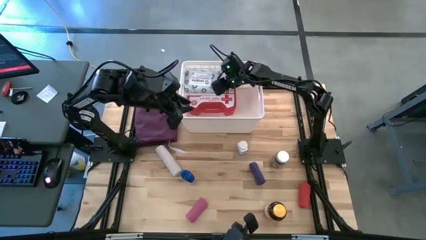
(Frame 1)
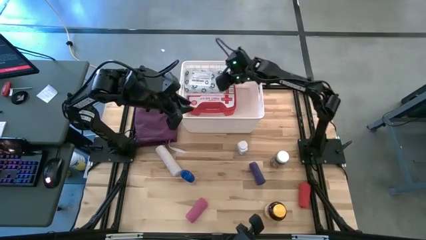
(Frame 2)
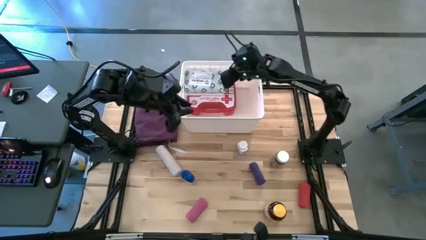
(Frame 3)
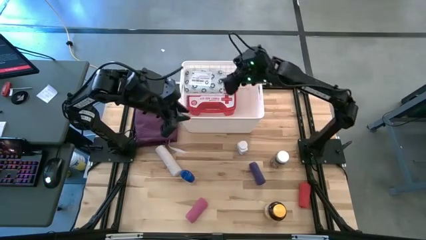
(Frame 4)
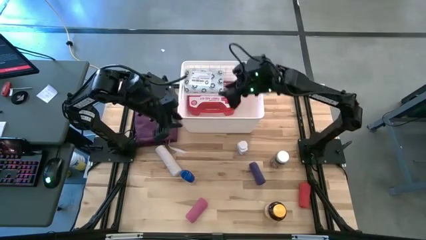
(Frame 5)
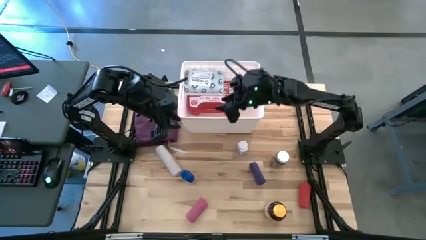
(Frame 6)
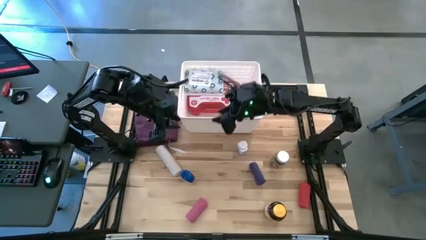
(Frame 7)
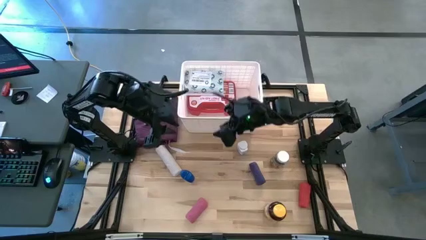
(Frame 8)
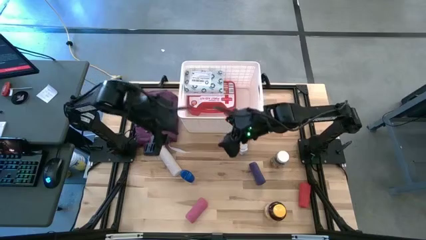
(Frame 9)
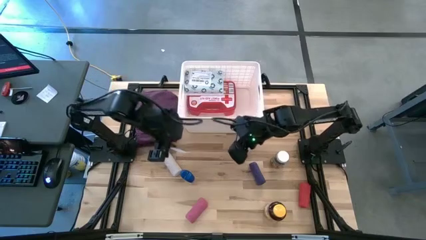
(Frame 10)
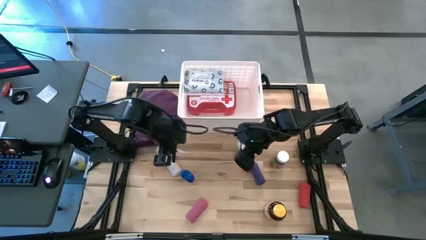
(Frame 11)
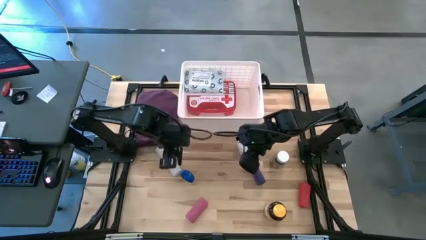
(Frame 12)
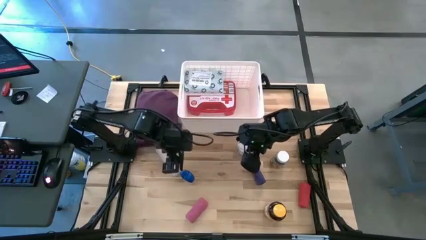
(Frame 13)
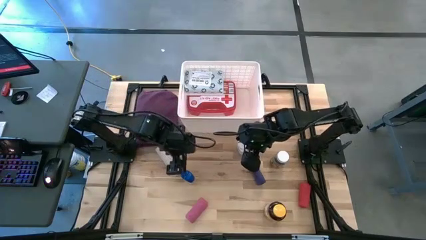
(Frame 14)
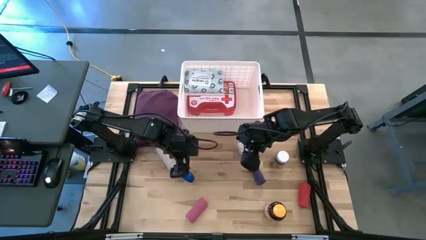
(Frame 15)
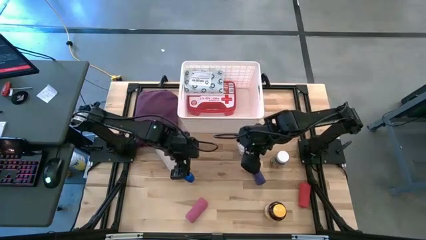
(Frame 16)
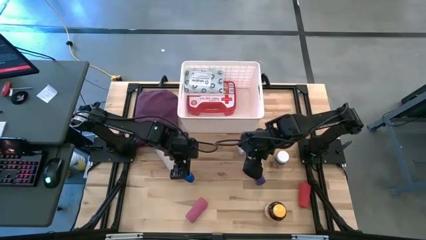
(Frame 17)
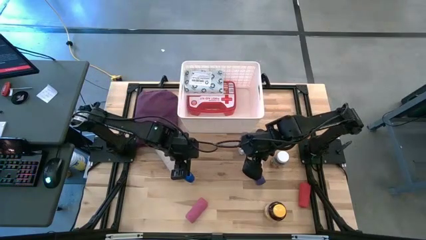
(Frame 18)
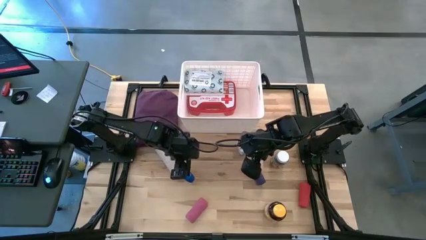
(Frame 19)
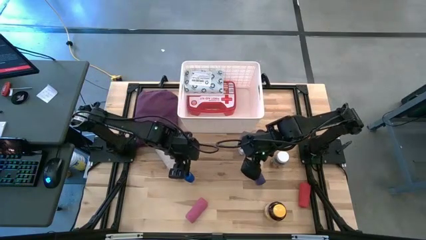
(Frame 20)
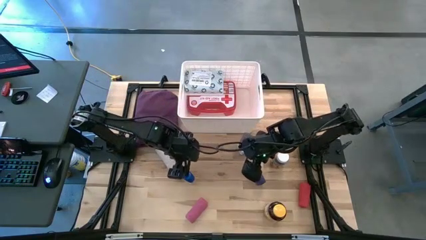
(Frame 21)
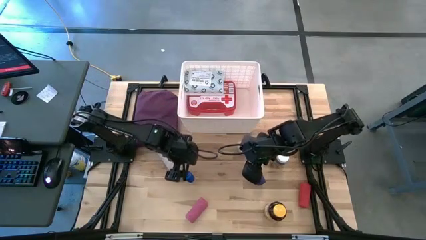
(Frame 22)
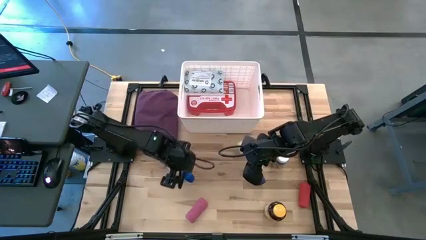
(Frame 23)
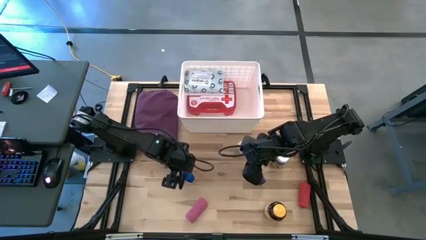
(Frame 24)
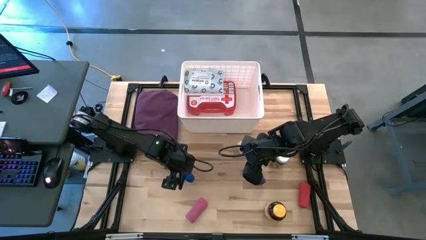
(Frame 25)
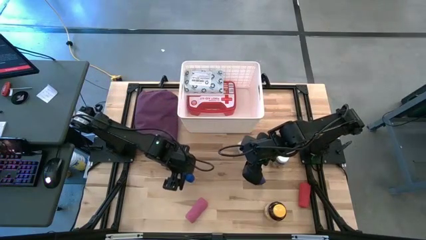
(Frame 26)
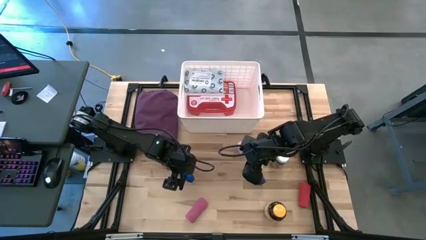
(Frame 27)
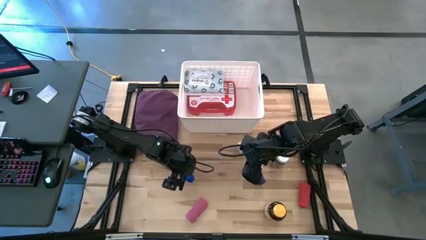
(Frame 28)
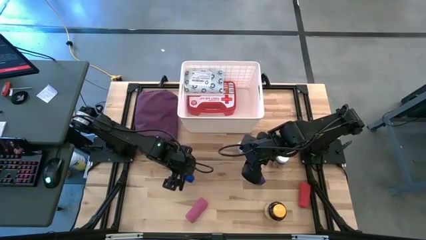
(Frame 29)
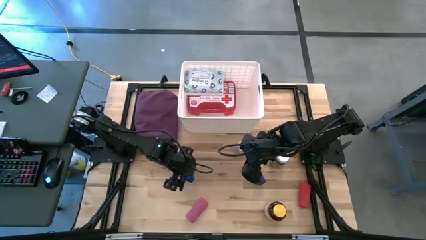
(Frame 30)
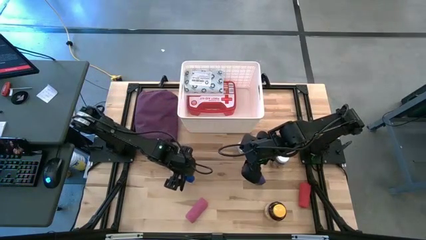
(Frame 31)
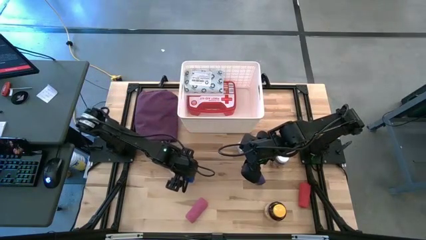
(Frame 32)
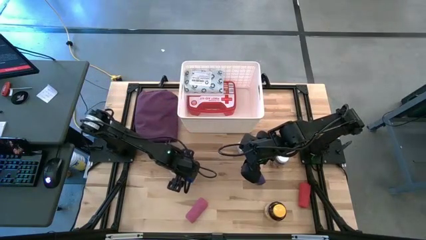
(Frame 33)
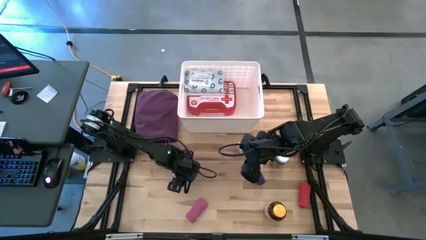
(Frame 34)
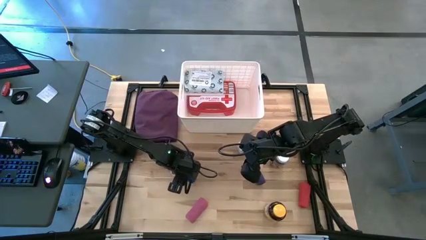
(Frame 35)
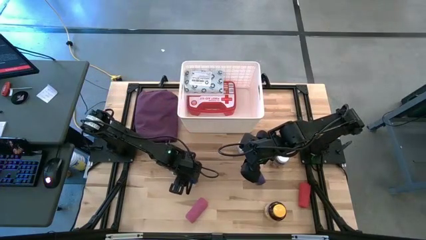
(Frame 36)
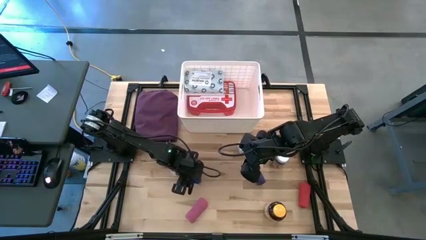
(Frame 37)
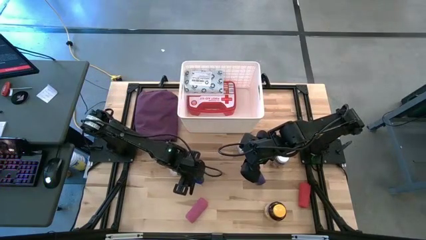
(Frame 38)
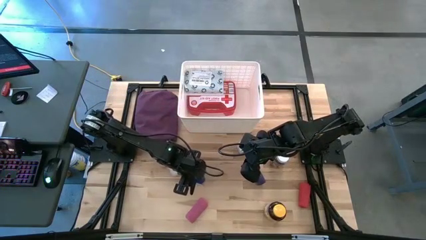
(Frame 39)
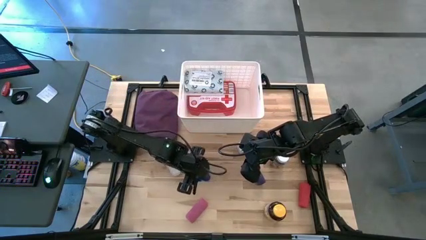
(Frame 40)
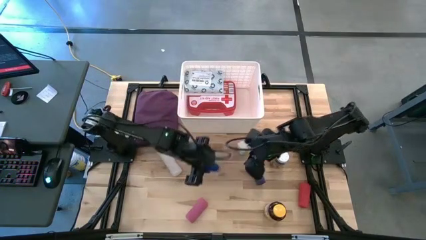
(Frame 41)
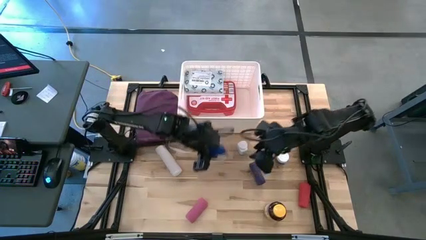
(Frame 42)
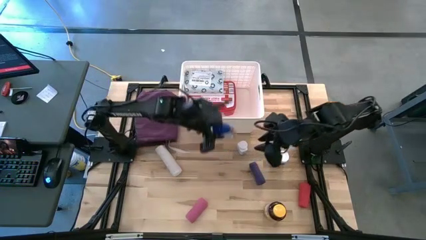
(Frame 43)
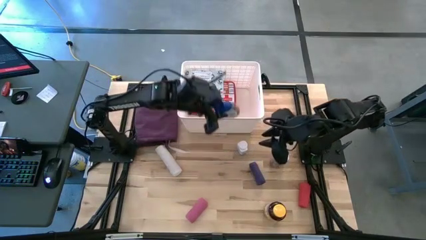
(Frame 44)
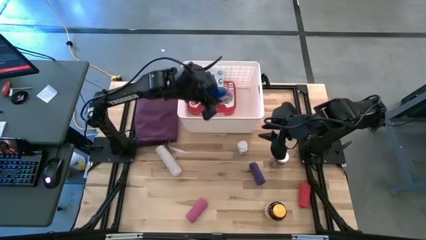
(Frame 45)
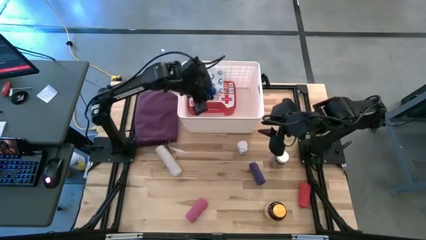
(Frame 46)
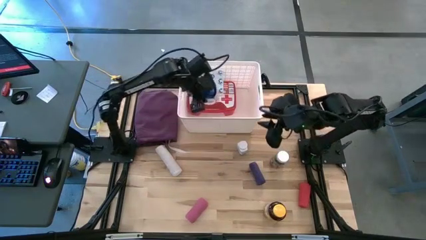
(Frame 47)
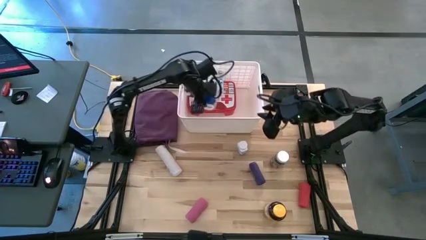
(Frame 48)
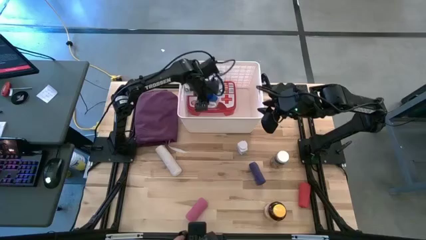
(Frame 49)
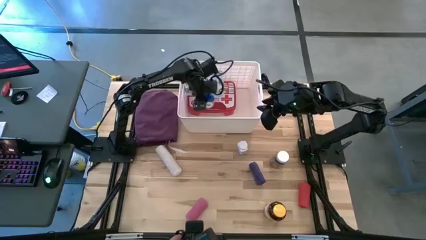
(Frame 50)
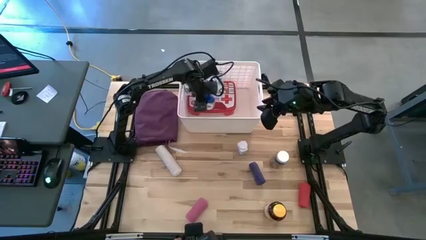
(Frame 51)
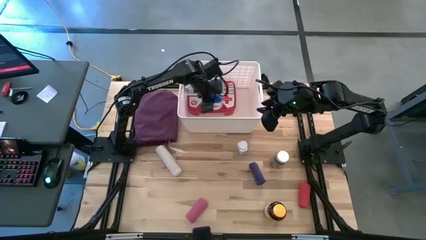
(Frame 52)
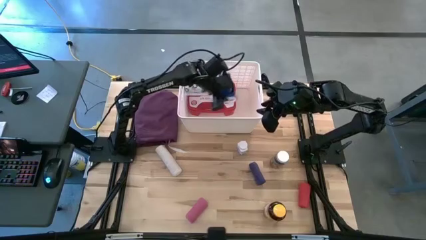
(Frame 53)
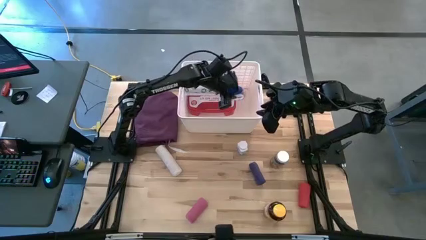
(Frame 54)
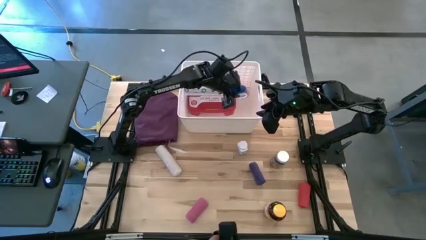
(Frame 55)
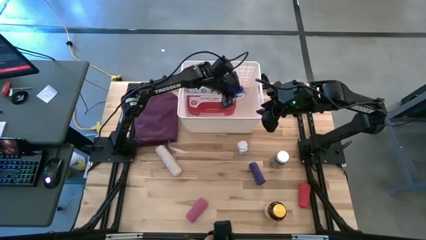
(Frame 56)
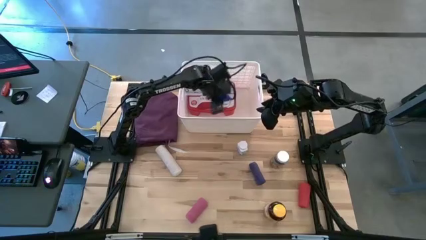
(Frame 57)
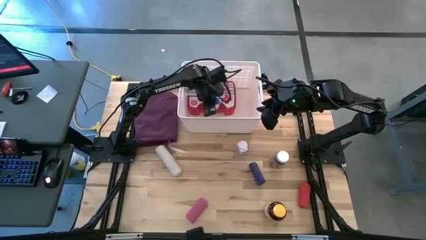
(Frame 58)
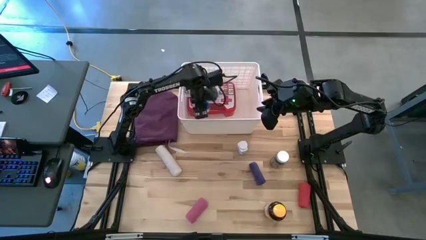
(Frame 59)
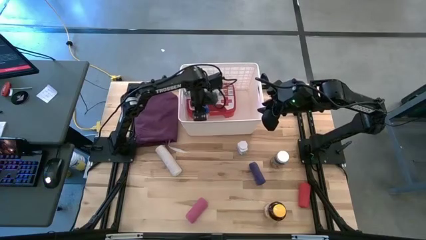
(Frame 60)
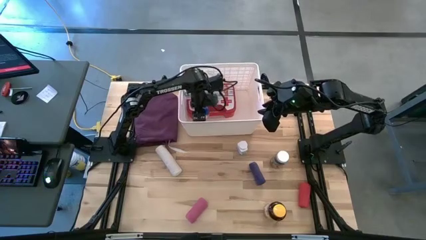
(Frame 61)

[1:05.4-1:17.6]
Task: Pick & place medical supplies in basket/bin
Put the blue pill bottle into the white bin

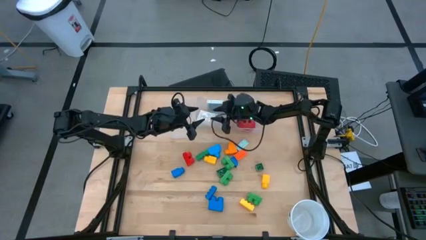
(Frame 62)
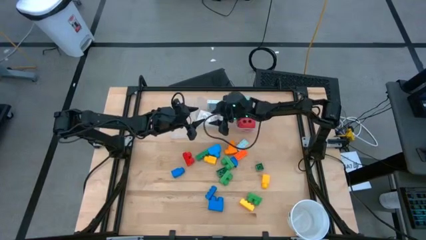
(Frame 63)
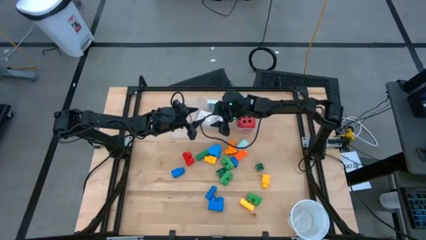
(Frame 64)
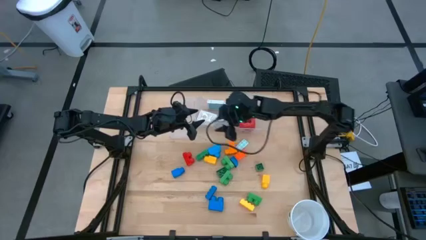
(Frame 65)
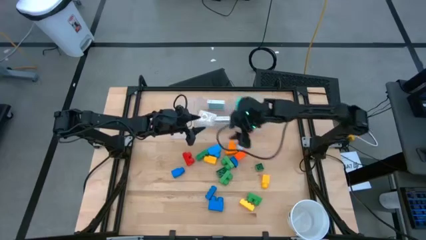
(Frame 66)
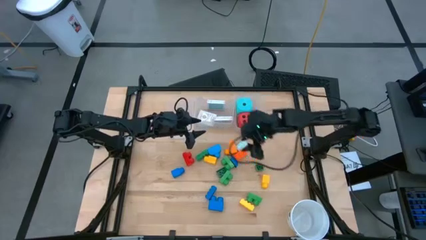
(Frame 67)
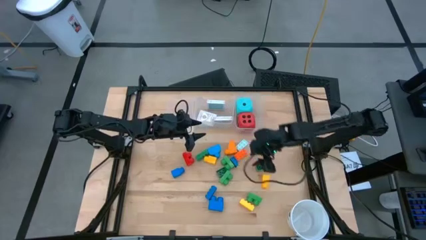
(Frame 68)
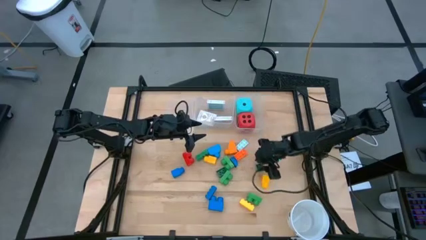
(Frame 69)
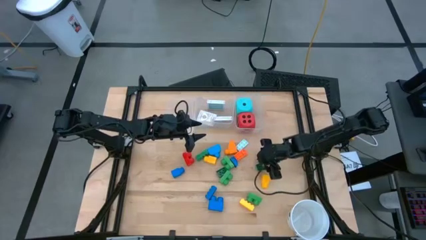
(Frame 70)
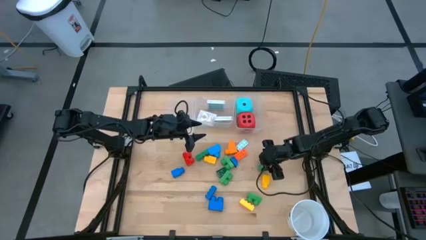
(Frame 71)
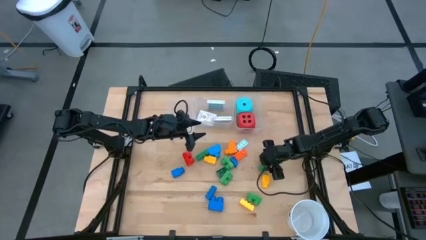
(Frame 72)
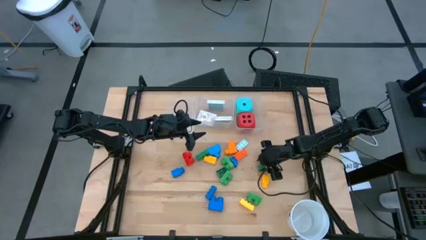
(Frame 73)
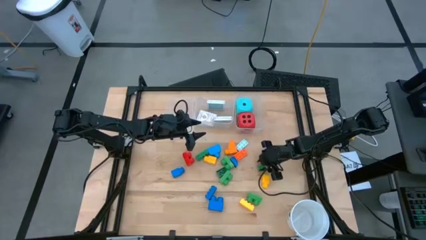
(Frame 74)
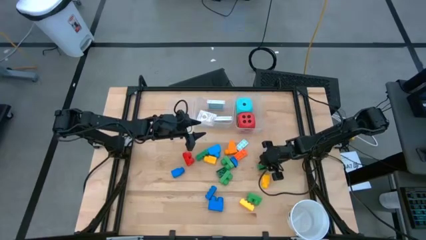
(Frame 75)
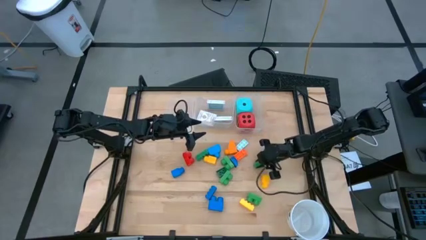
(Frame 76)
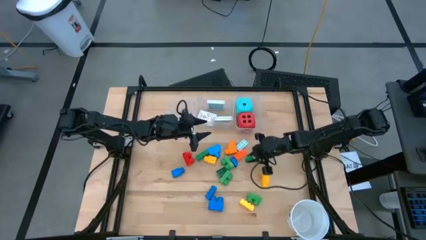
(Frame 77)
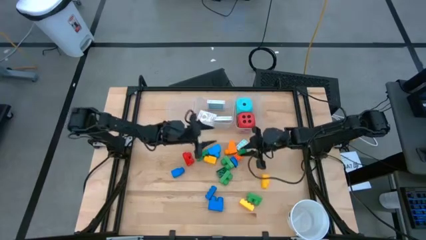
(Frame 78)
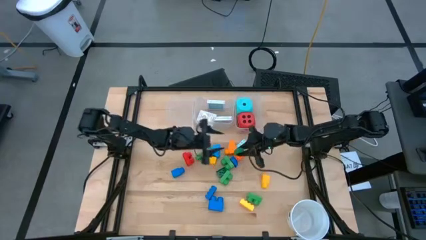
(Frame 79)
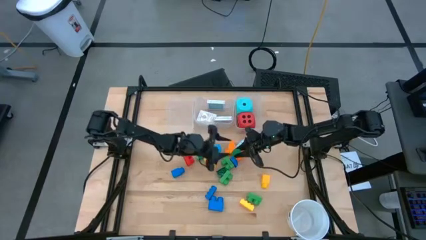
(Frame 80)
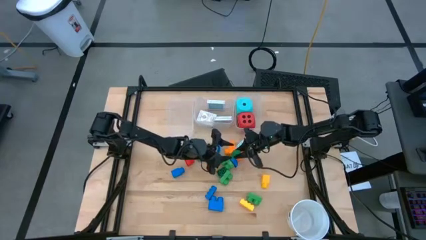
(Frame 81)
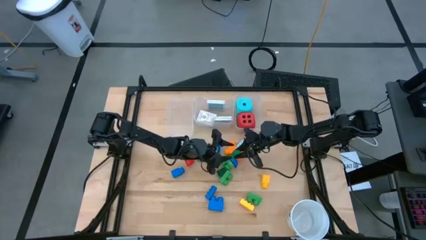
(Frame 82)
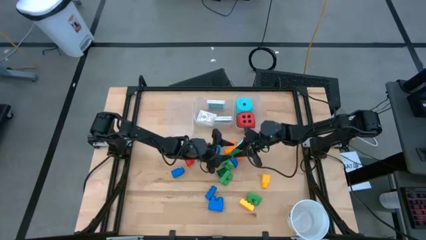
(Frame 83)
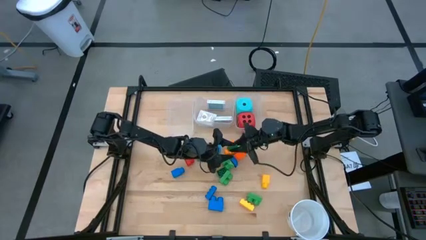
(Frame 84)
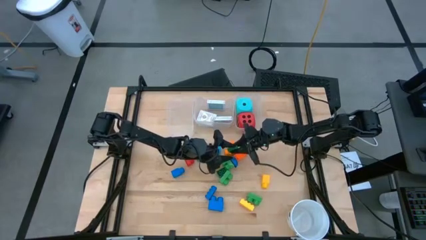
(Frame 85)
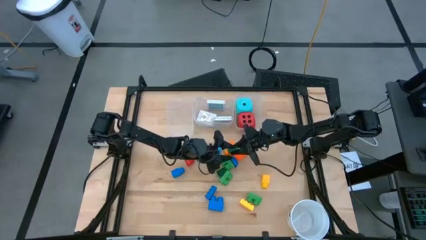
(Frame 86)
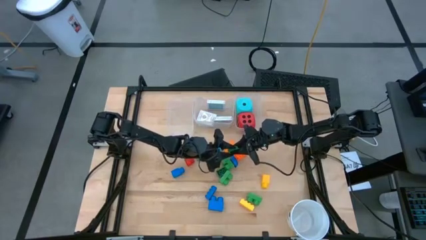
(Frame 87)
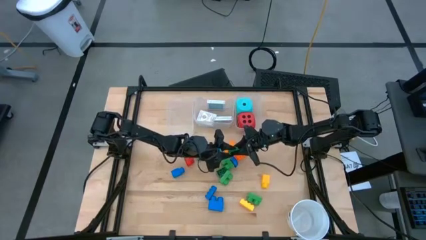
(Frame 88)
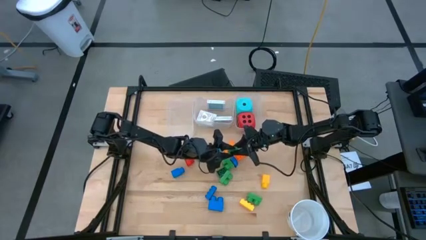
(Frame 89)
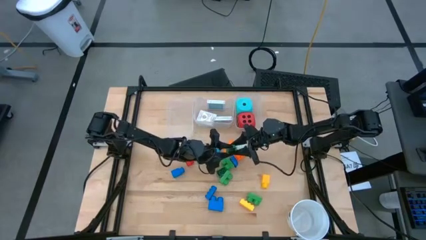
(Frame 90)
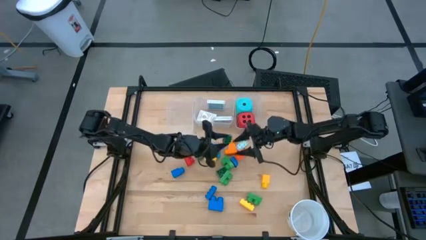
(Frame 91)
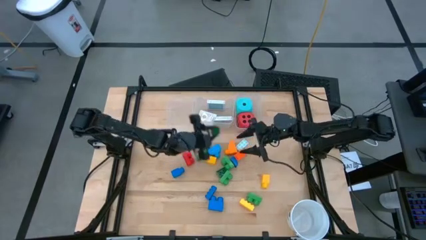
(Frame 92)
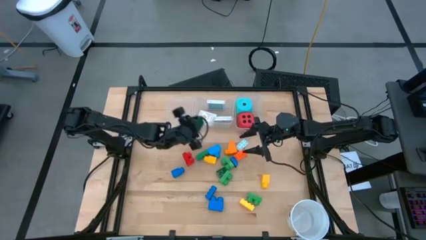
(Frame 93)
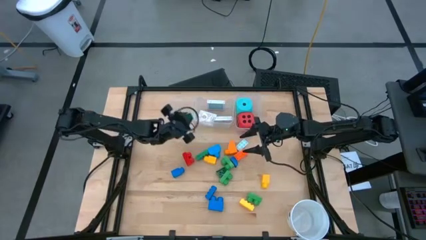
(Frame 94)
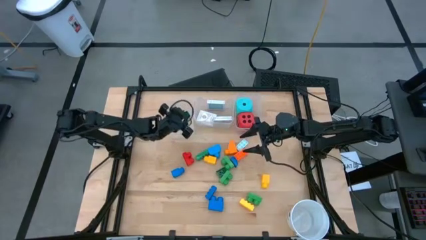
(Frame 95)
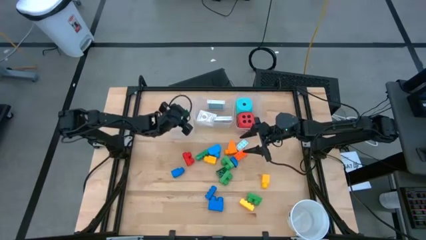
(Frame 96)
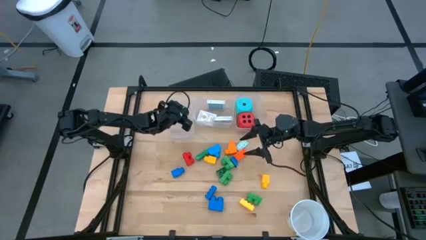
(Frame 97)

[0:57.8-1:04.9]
Task: Pick & Place Toys
Put the green game piece into the left transparent bin
